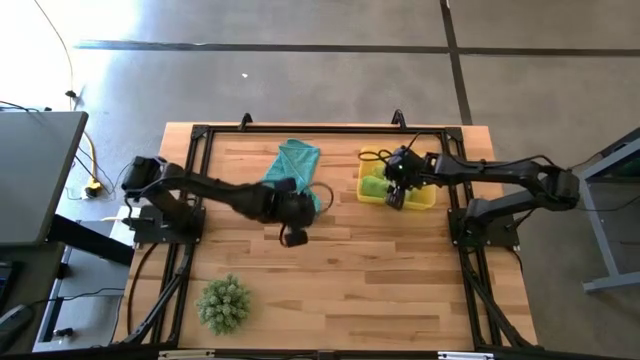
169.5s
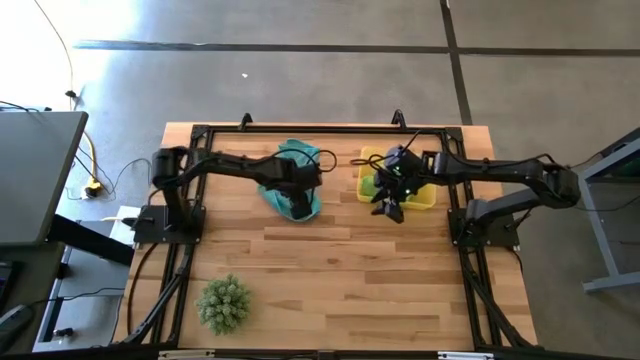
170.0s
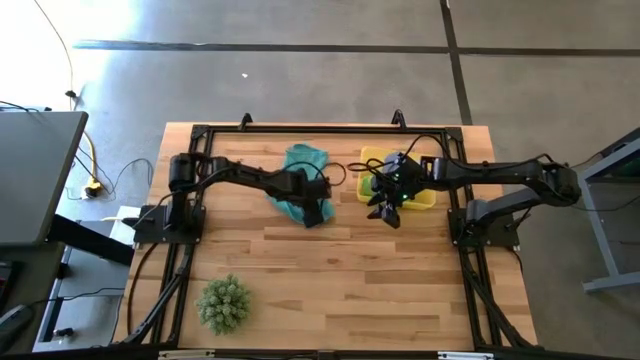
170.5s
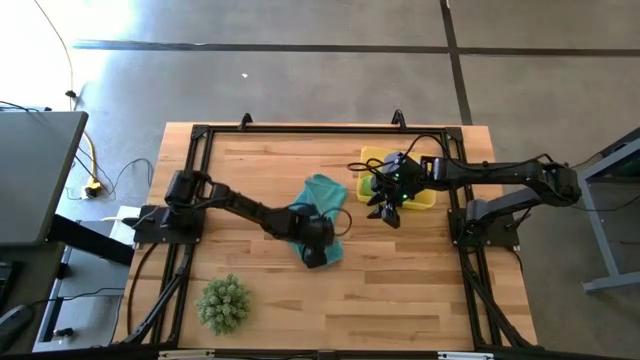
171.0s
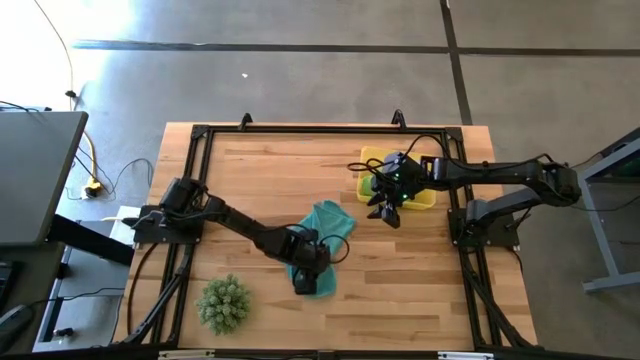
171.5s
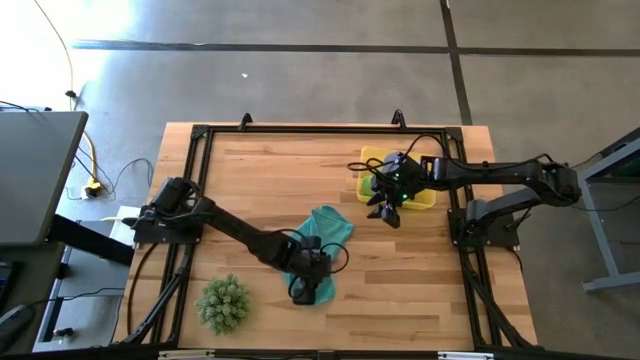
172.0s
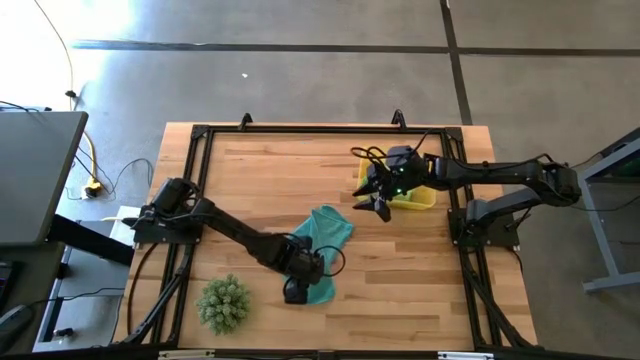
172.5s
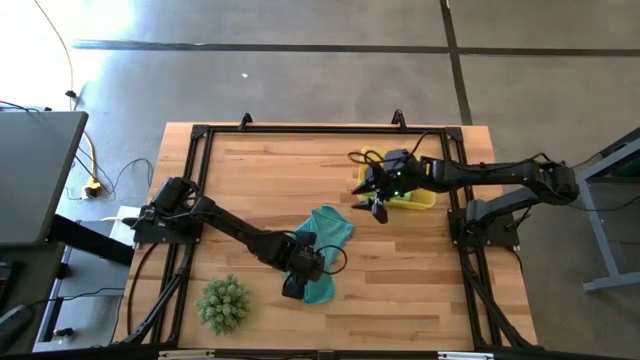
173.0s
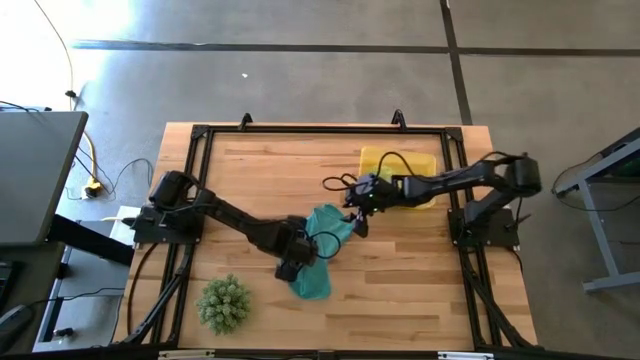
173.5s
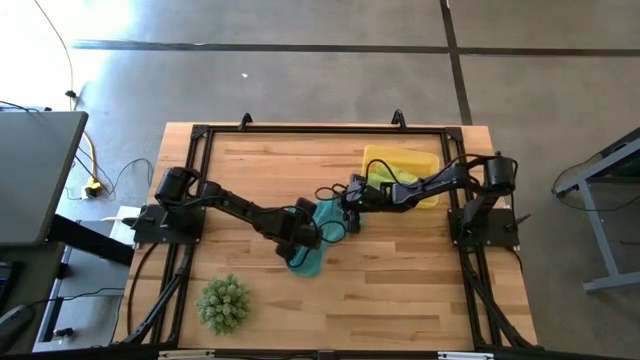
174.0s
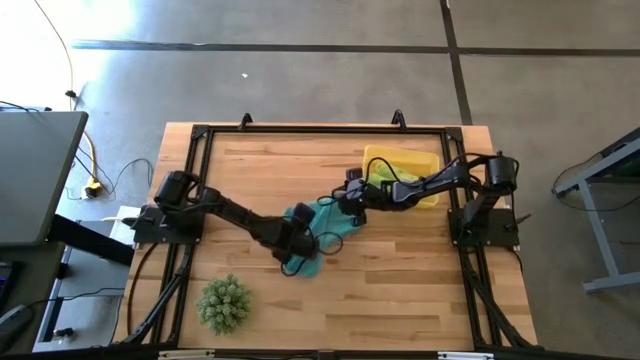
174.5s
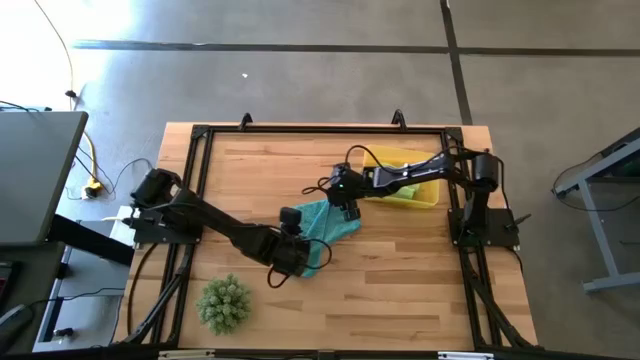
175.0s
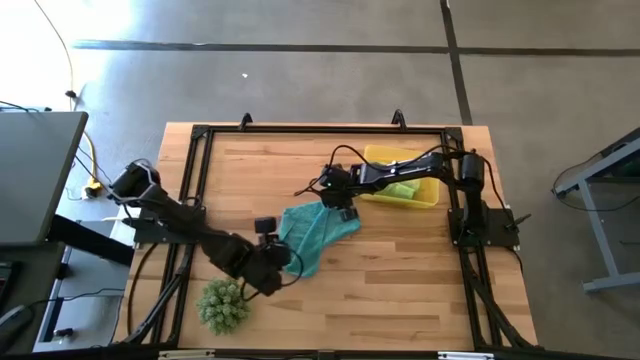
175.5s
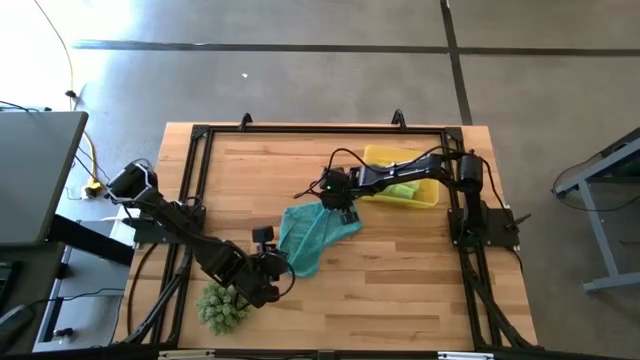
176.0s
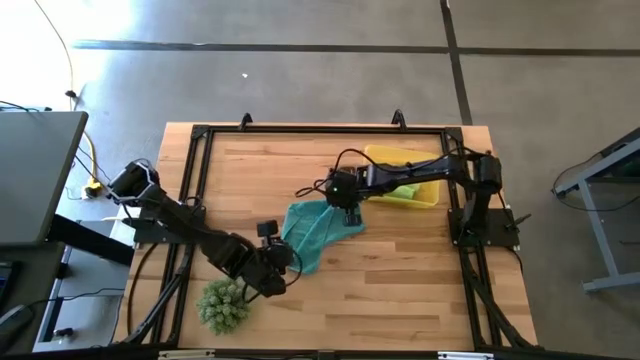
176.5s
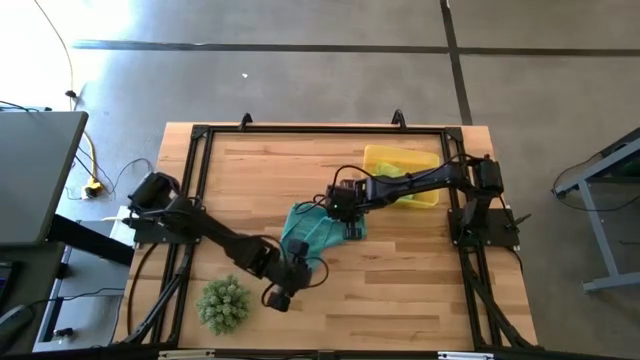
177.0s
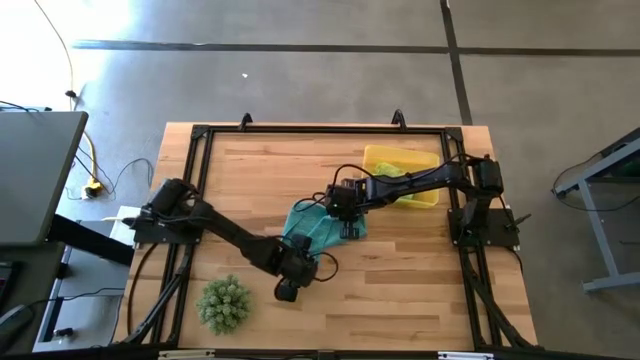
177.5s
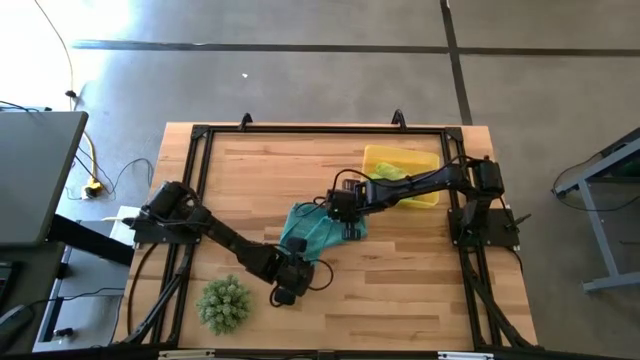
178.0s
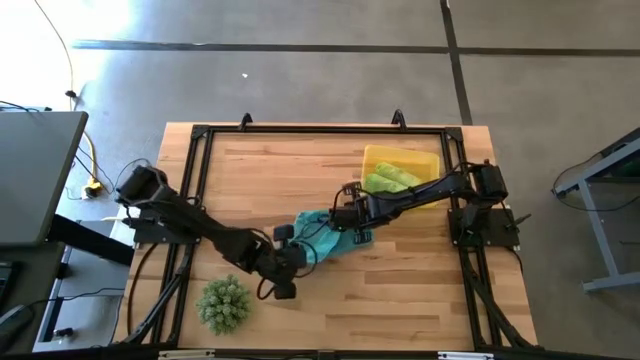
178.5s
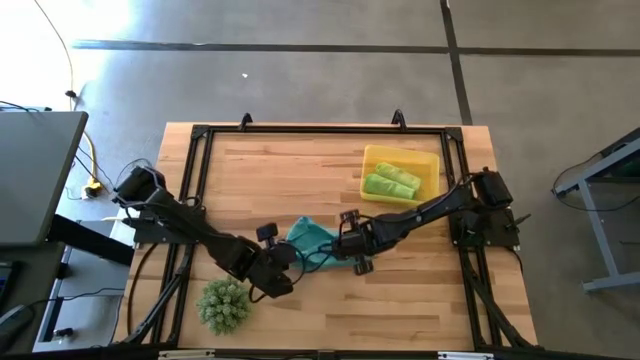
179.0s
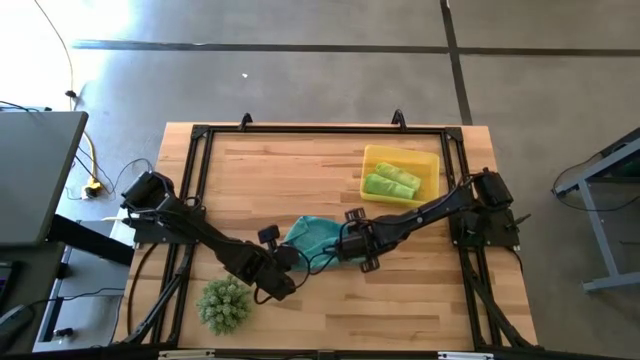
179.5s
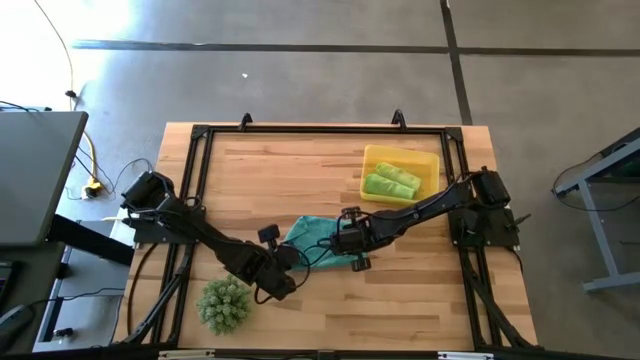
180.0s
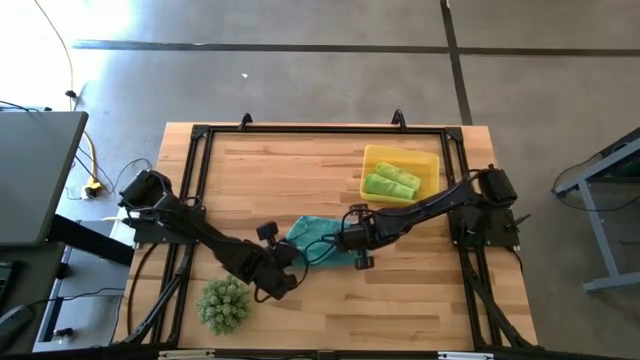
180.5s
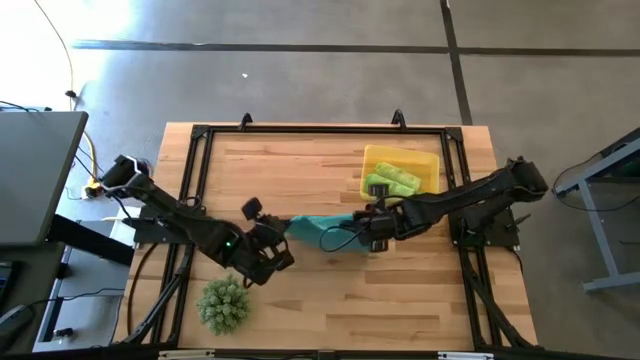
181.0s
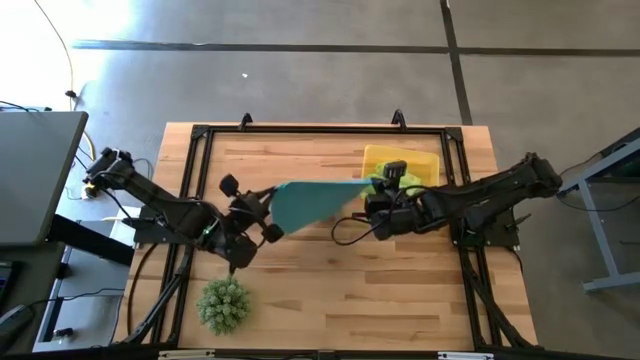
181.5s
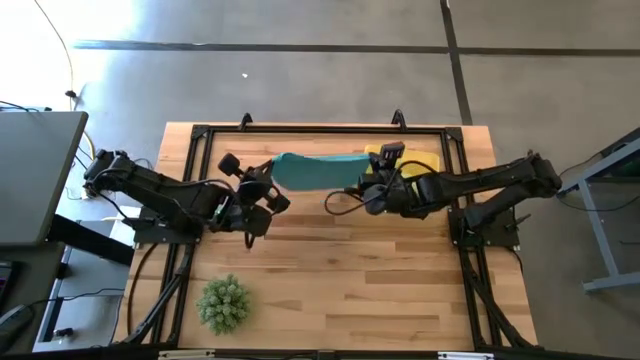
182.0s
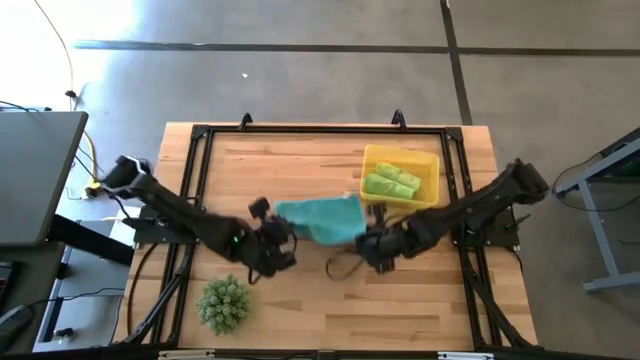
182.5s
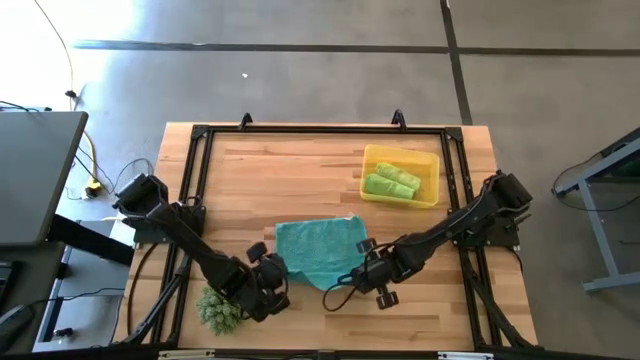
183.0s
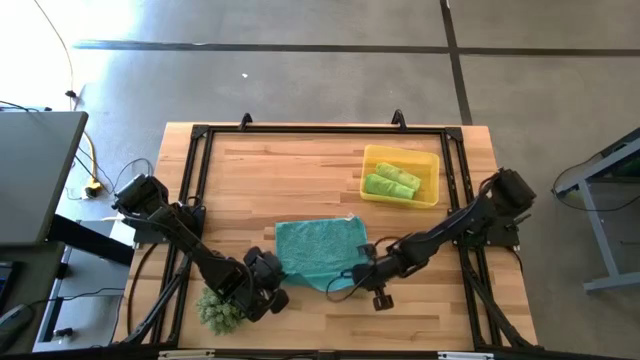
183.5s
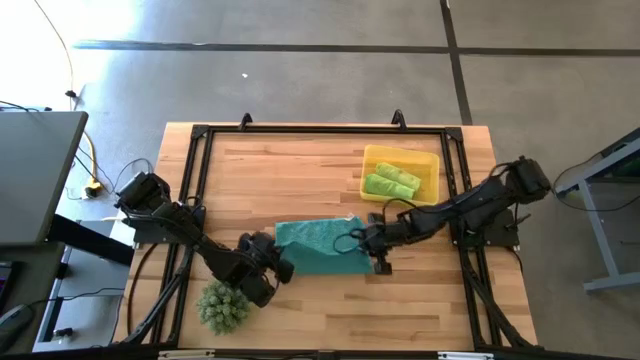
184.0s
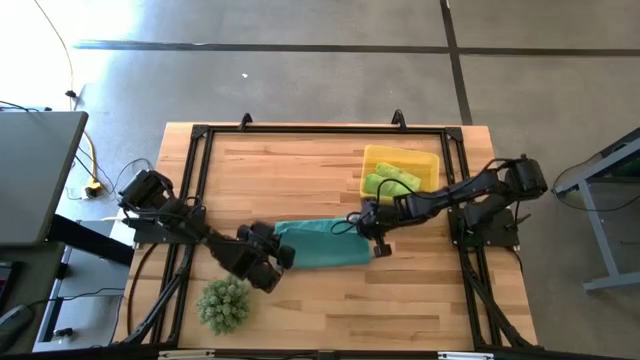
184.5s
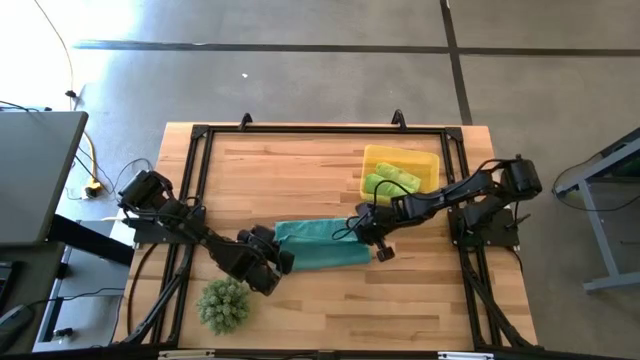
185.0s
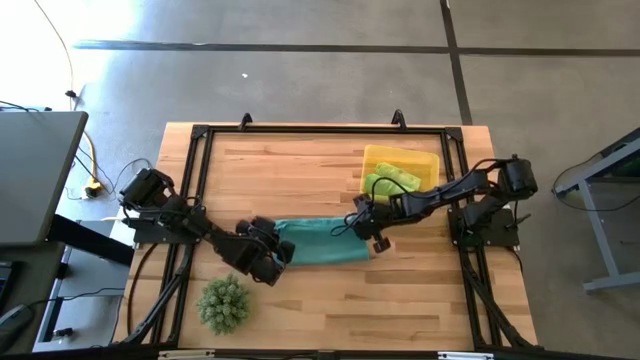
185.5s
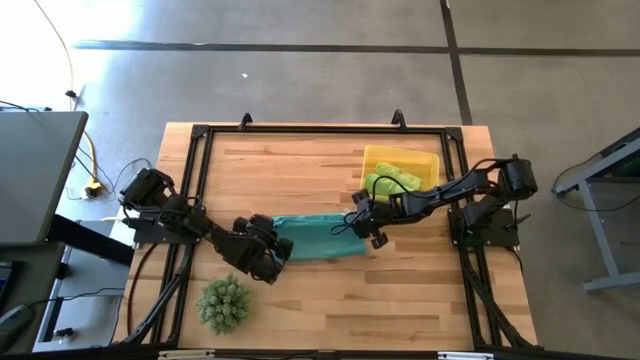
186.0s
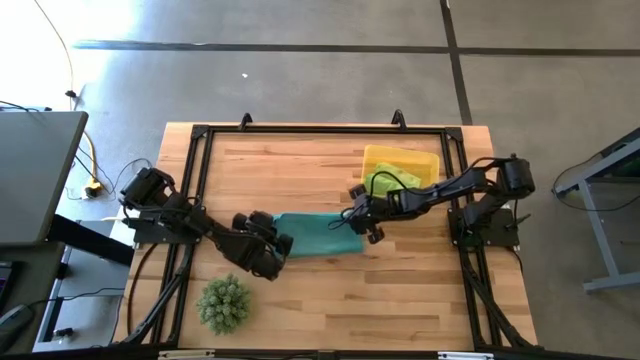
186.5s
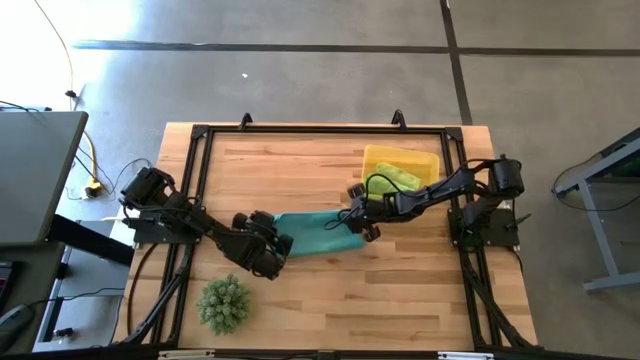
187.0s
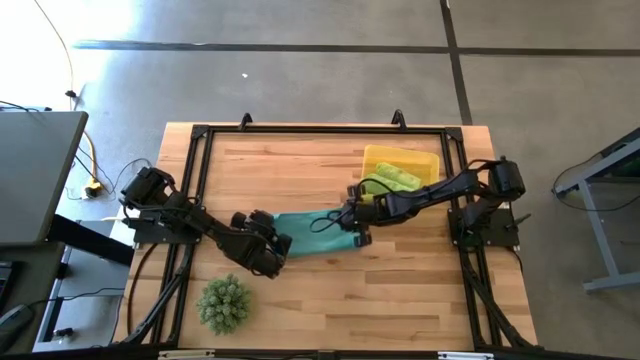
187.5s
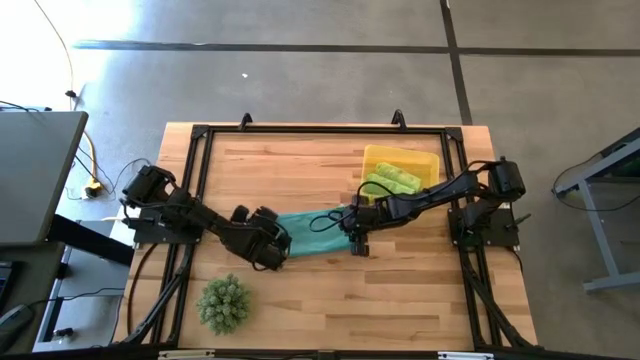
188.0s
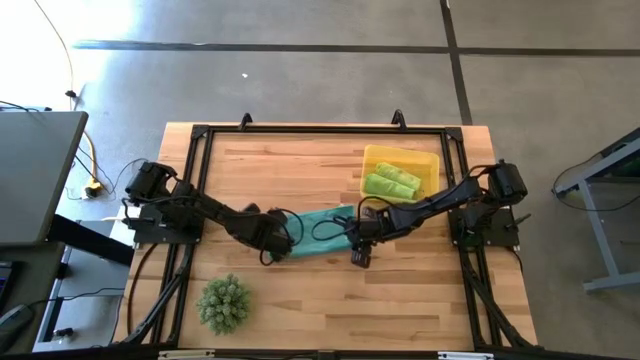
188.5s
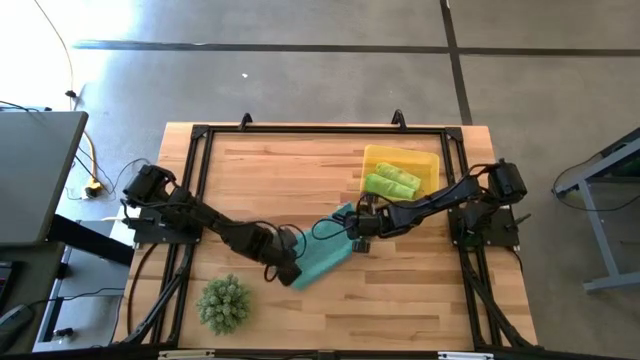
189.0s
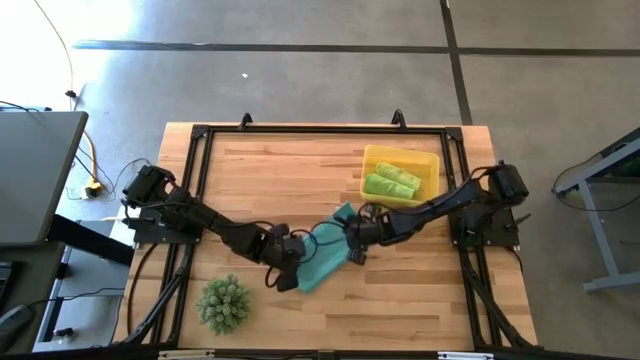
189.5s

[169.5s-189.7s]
Task: Roll microfiber towels into tight, uniform cylinder then place into a basket
Roll the blue towel

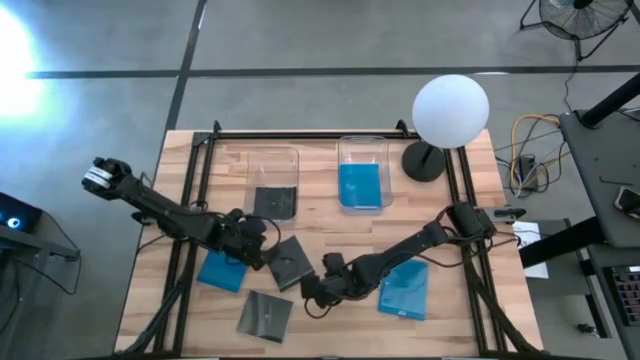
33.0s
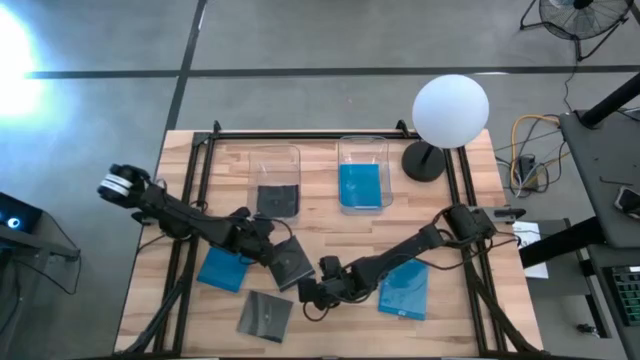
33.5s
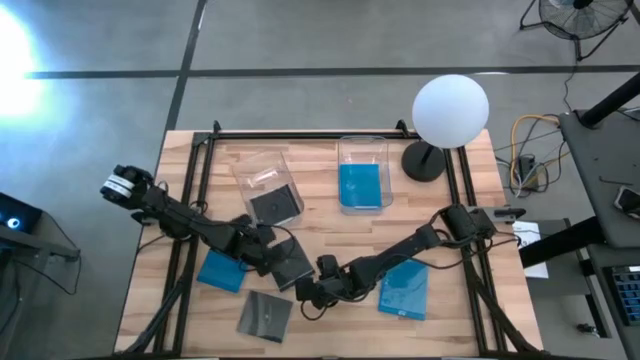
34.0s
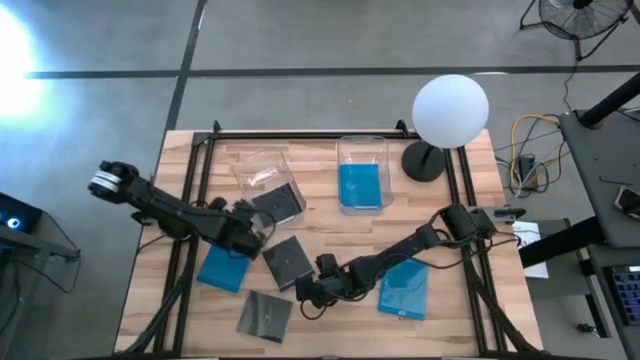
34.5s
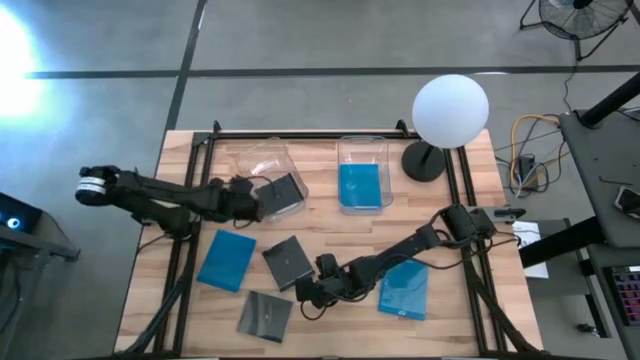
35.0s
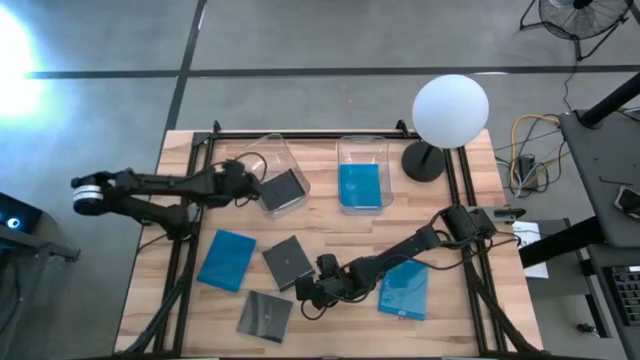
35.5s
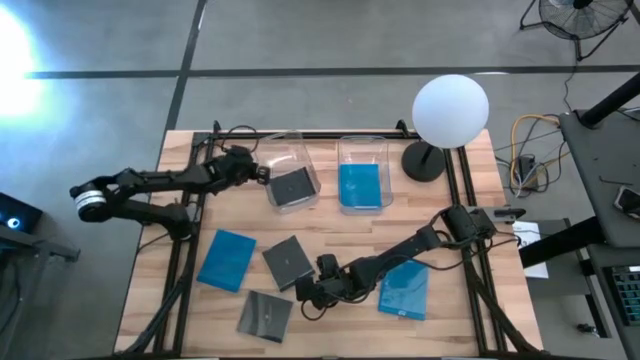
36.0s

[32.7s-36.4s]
Task: Pick & place jewel cases by type
Adjust the left transparent bin on the table
